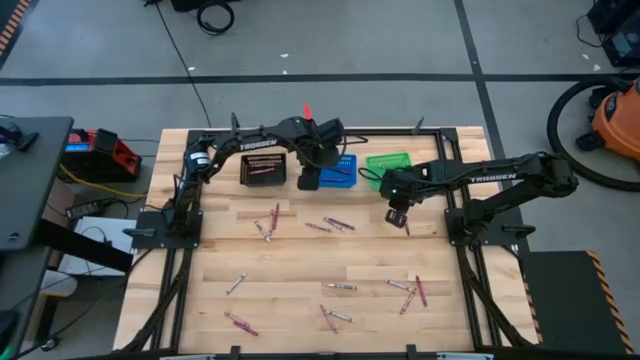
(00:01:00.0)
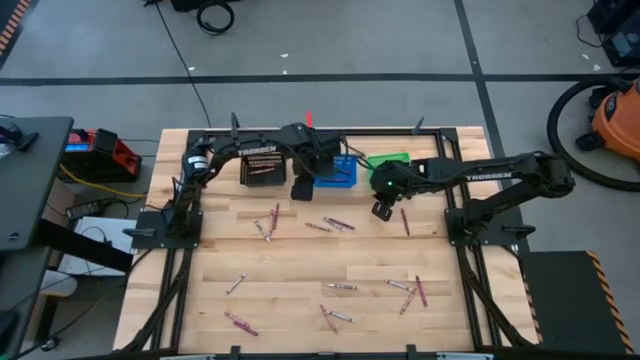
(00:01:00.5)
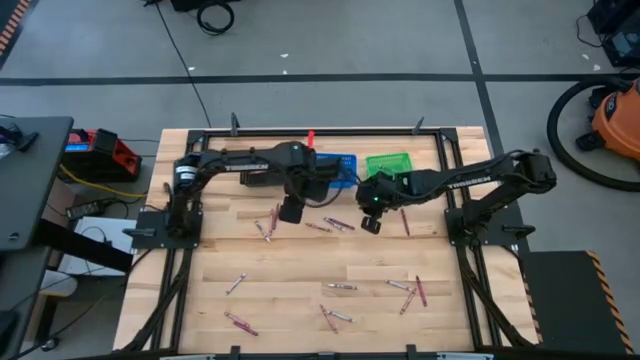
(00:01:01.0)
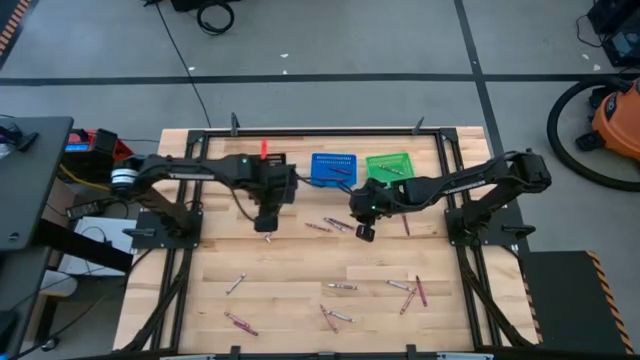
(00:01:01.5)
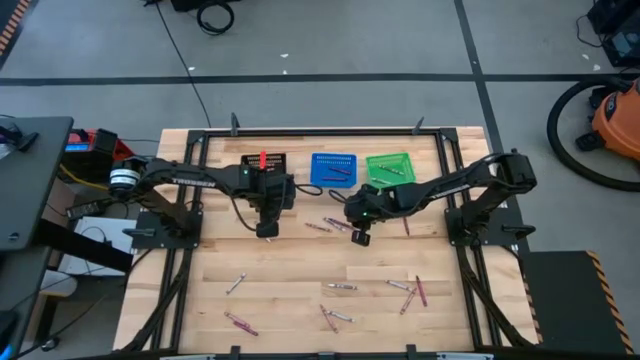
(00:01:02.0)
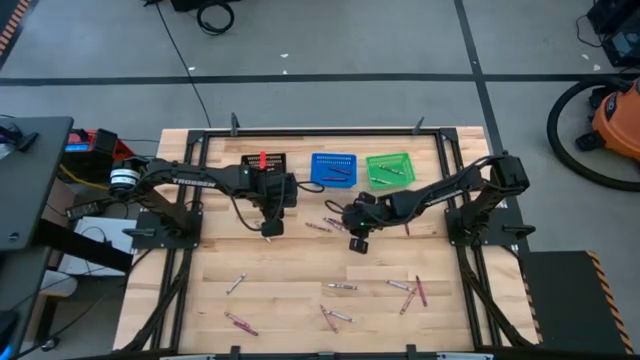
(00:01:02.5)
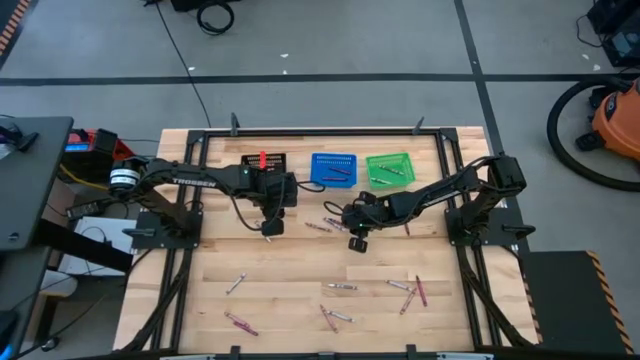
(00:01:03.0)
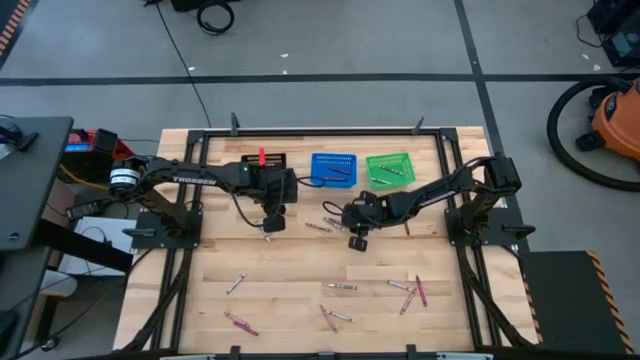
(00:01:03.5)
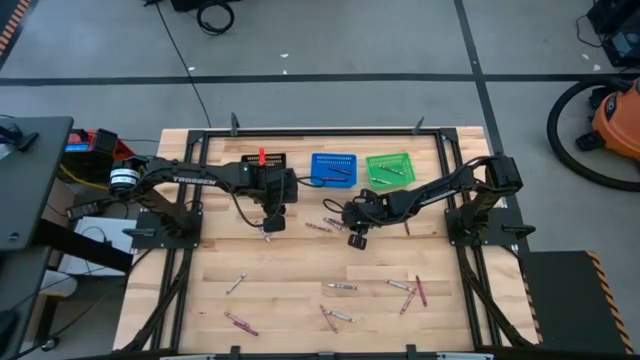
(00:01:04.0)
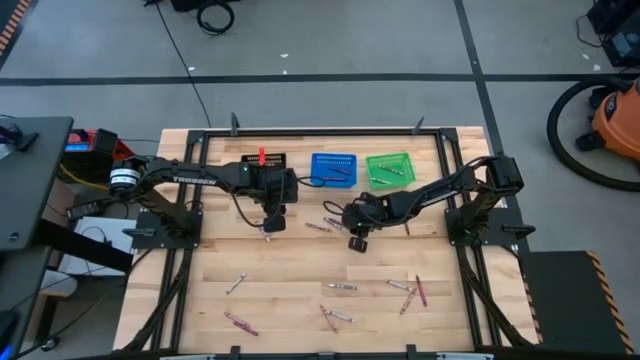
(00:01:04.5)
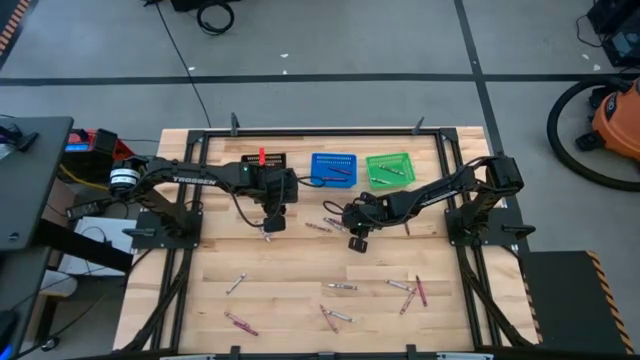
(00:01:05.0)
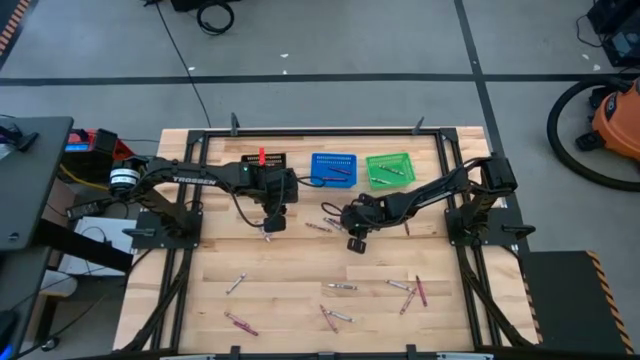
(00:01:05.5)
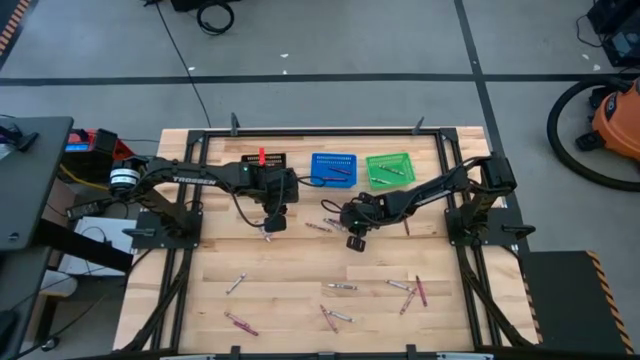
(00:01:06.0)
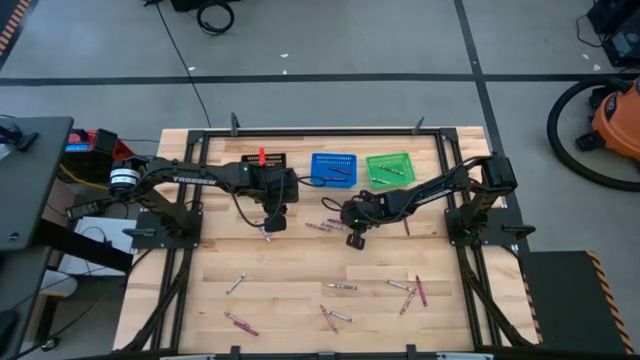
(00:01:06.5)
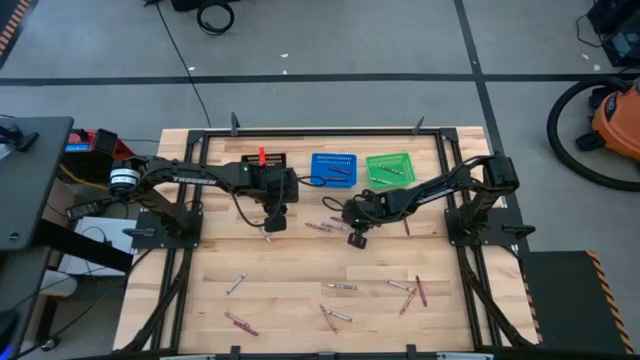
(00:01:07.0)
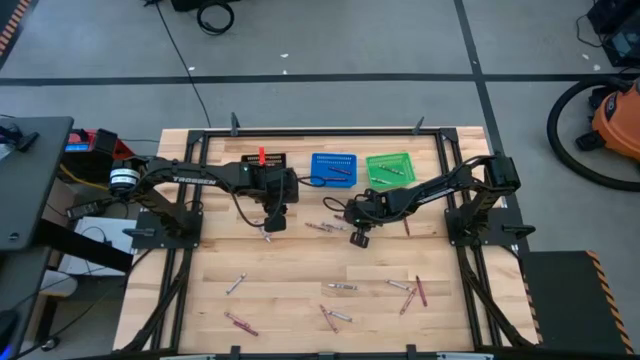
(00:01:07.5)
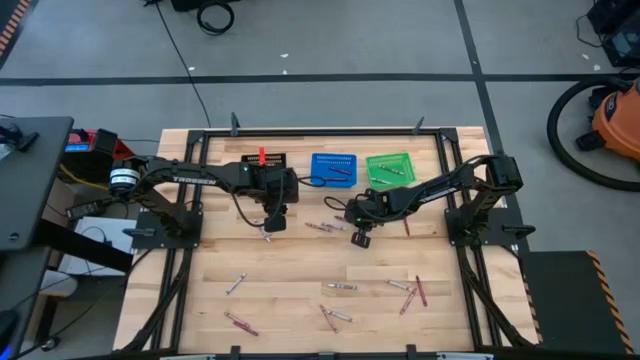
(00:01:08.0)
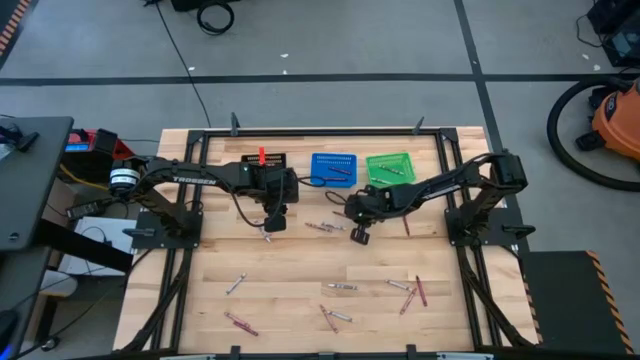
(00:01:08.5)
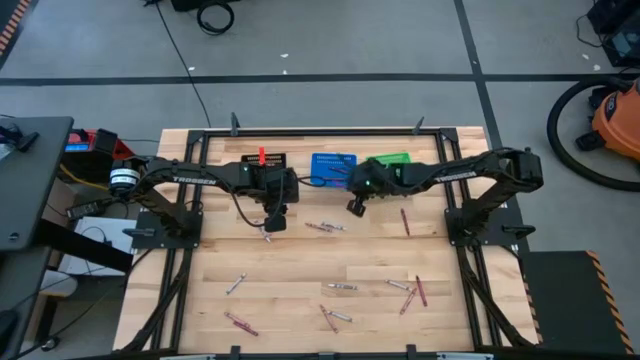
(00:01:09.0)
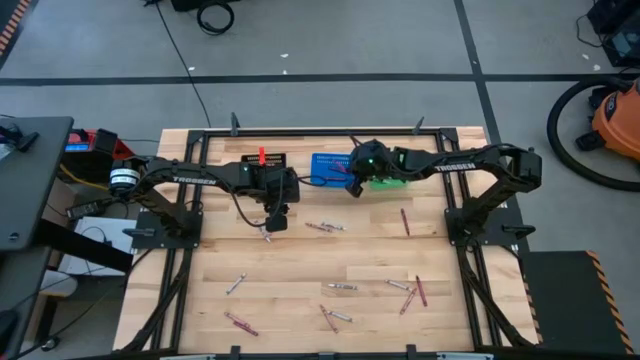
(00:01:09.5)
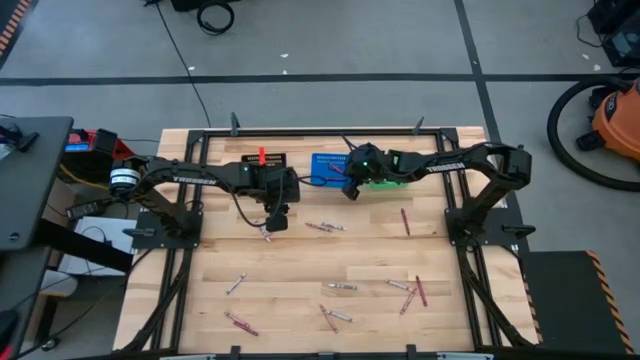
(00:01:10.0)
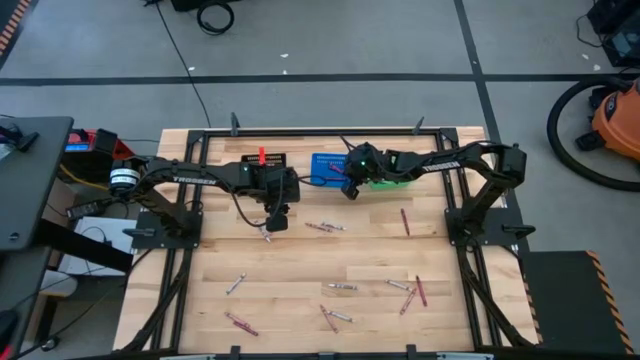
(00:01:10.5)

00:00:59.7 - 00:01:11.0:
Task: Sort crayons
Put the red crayon into the blue bin

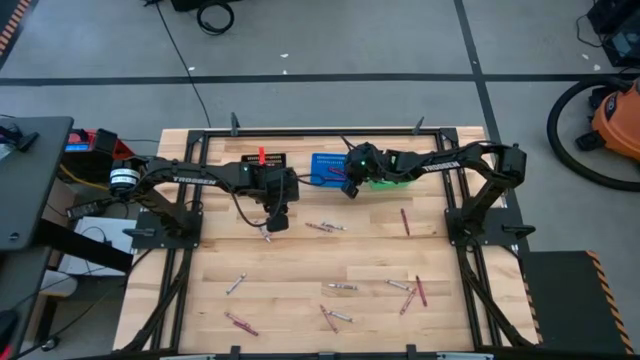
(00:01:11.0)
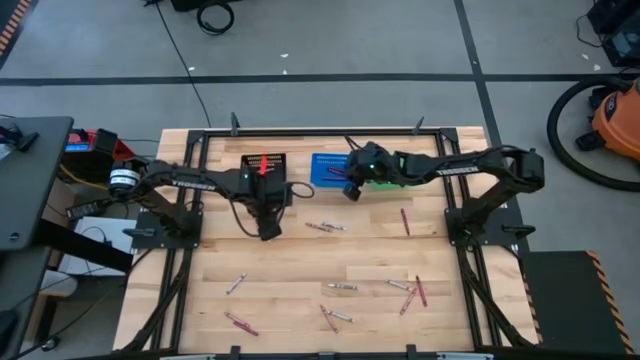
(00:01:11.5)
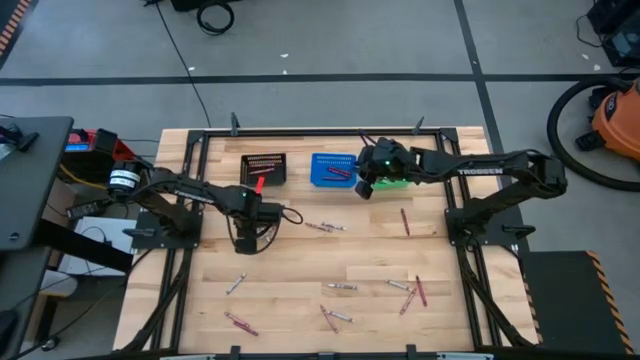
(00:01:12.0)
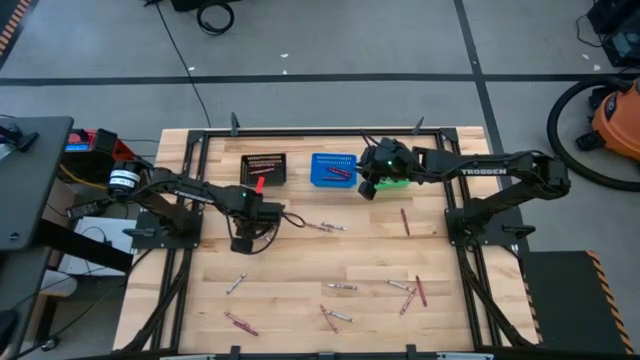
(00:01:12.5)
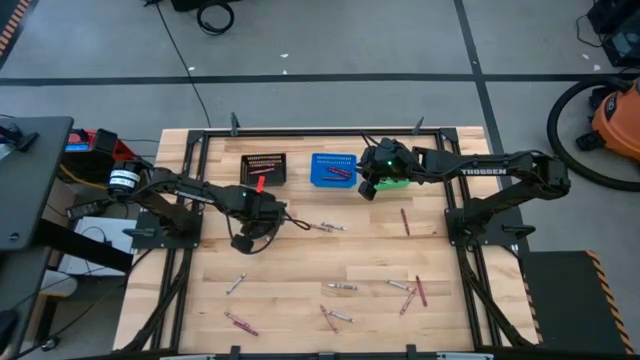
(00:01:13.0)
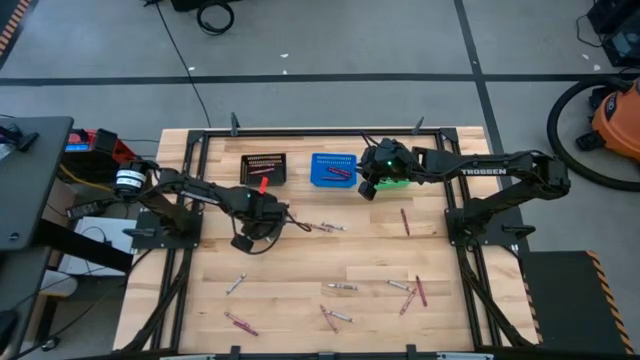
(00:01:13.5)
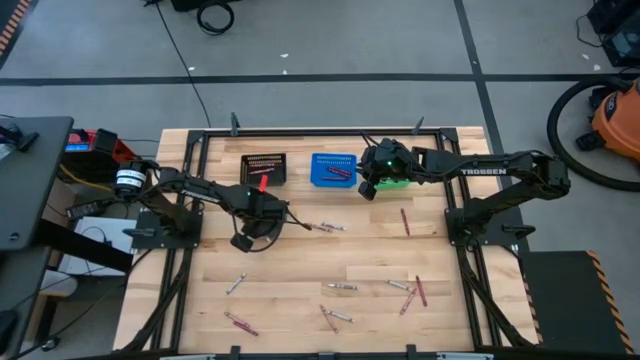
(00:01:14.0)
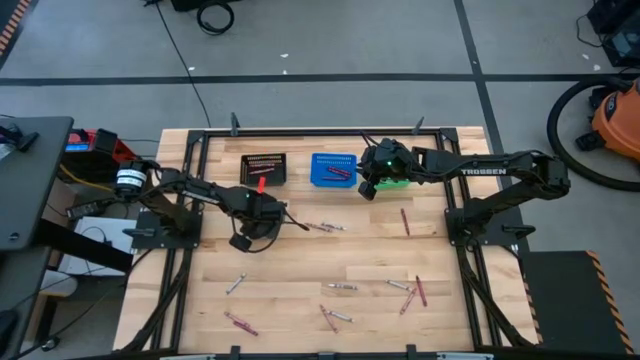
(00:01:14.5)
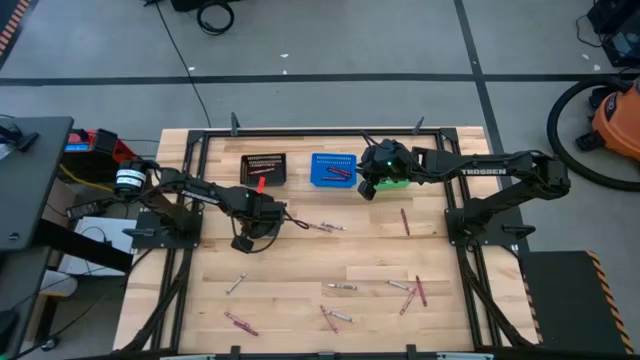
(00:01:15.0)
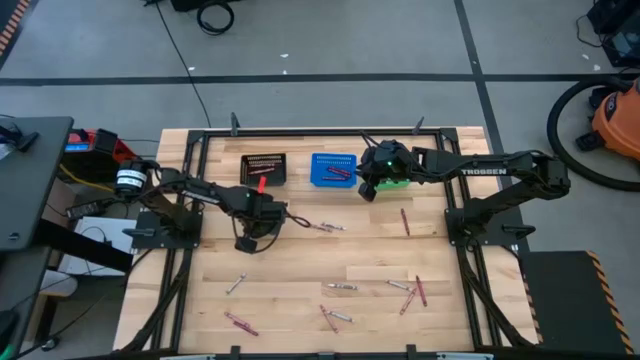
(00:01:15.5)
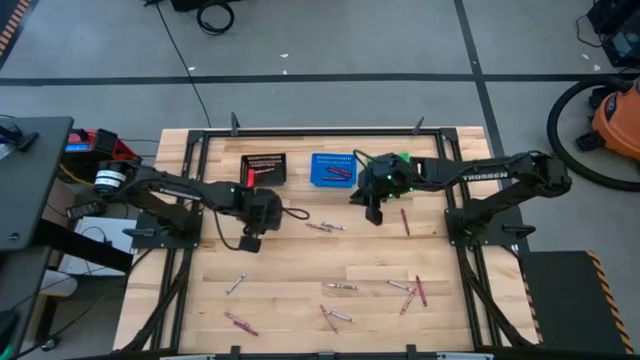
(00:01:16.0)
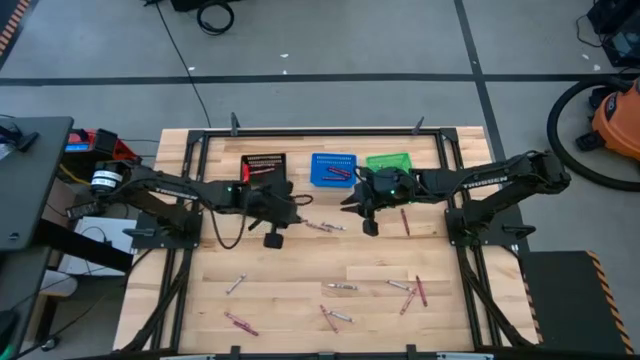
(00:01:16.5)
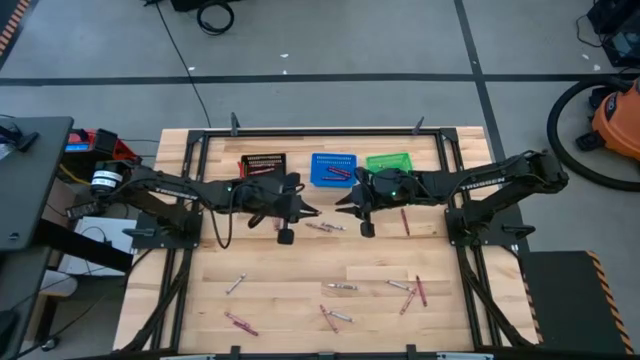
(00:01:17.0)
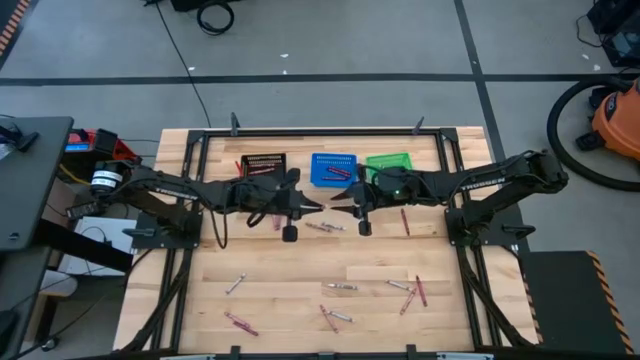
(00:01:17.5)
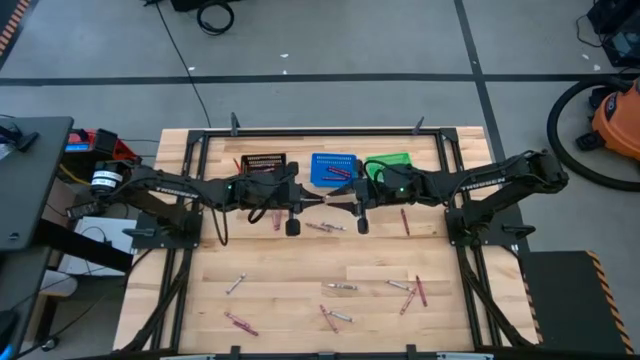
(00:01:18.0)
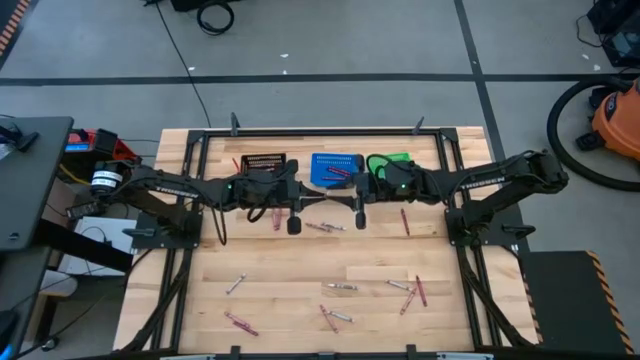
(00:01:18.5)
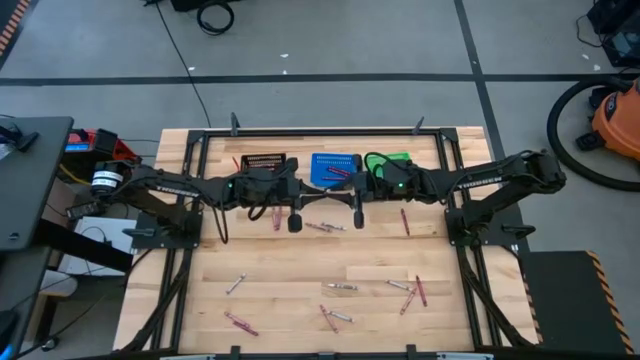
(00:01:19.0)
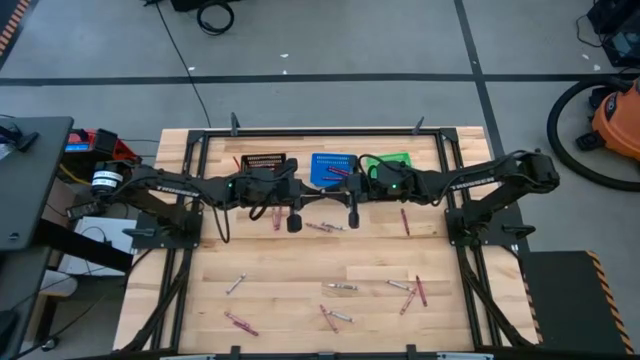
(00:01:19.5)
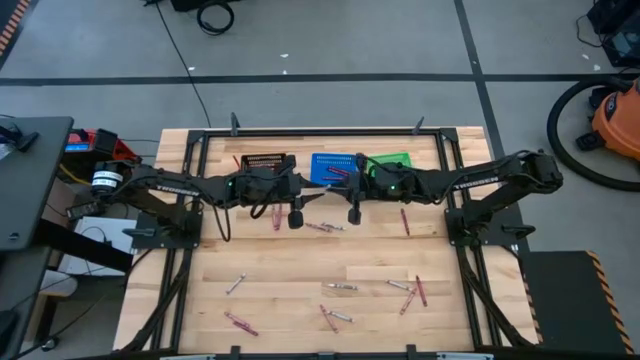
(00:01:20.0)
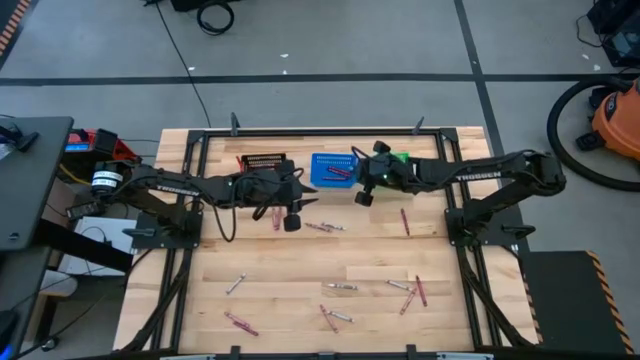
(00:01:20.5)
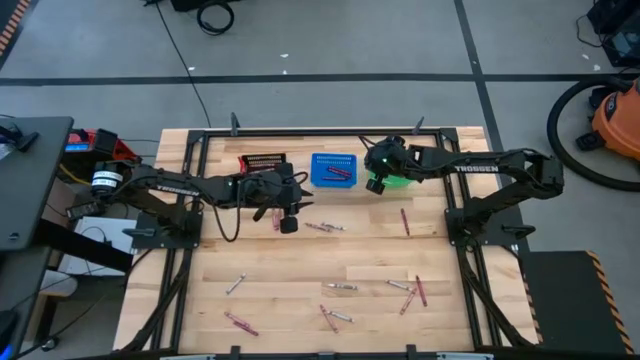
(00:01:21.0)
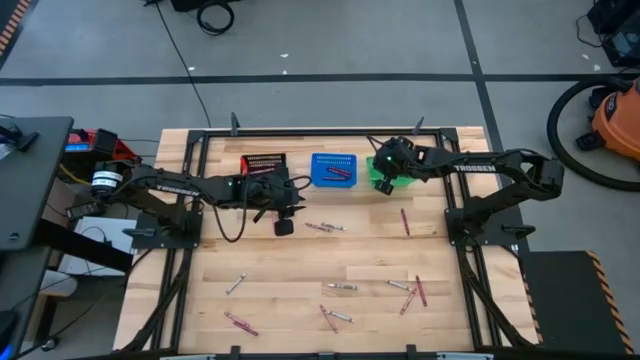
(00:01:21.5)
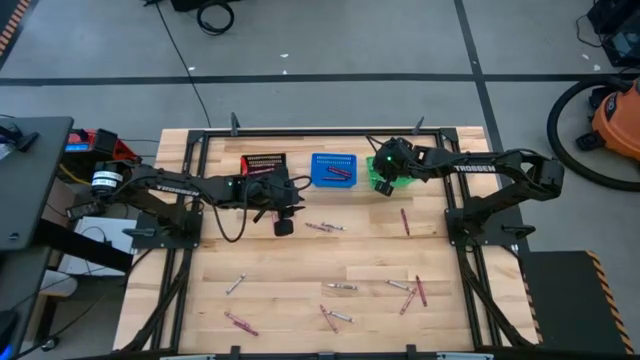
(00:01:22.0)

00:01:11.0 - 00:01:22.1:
Put the white crayon into the green bin
